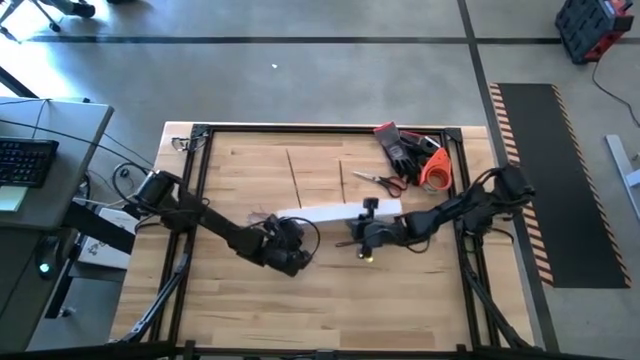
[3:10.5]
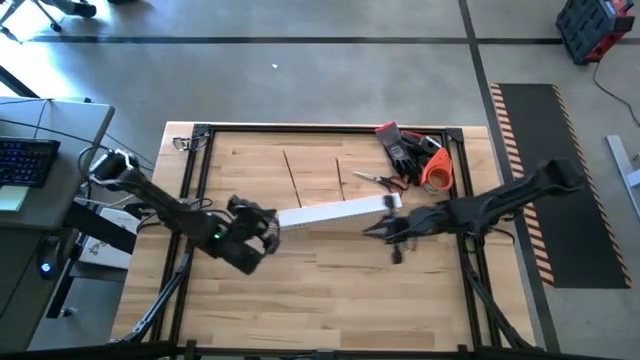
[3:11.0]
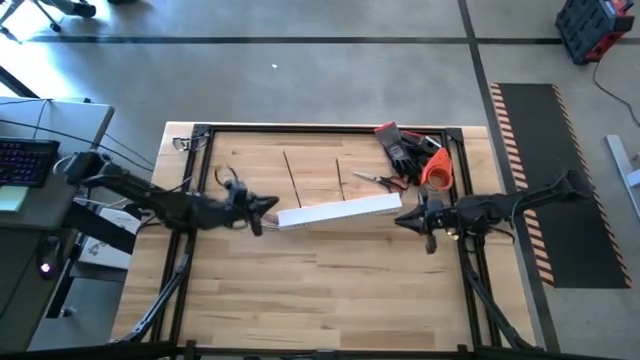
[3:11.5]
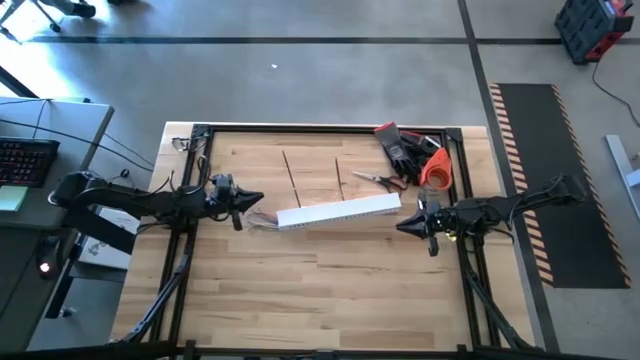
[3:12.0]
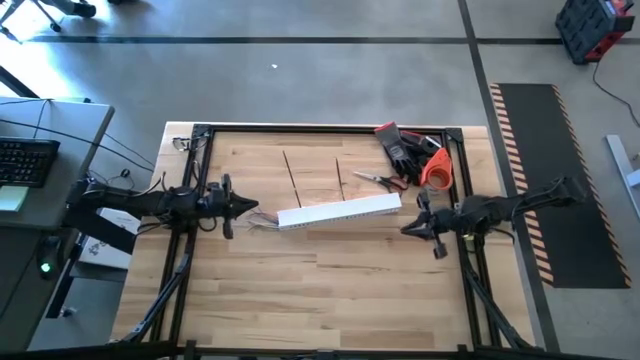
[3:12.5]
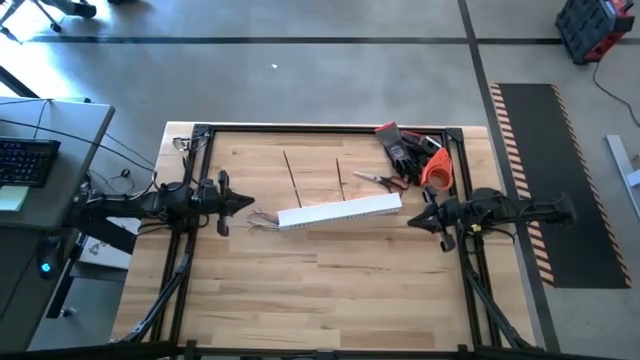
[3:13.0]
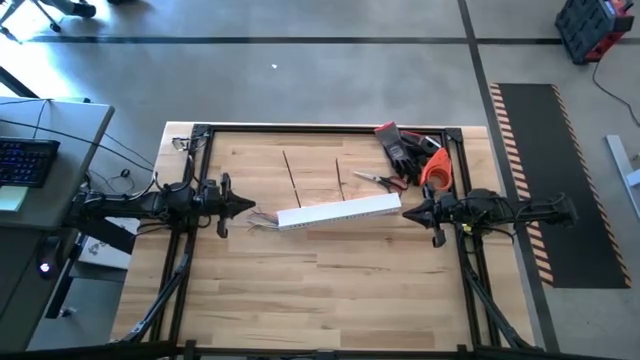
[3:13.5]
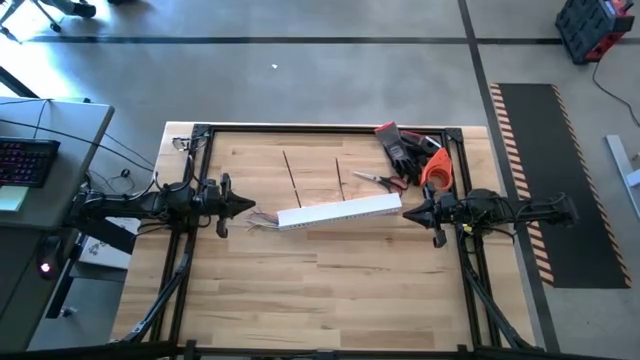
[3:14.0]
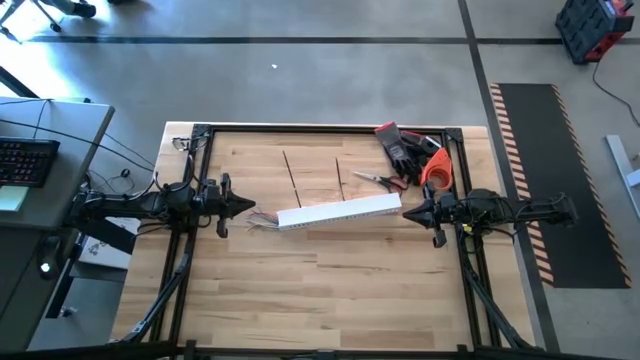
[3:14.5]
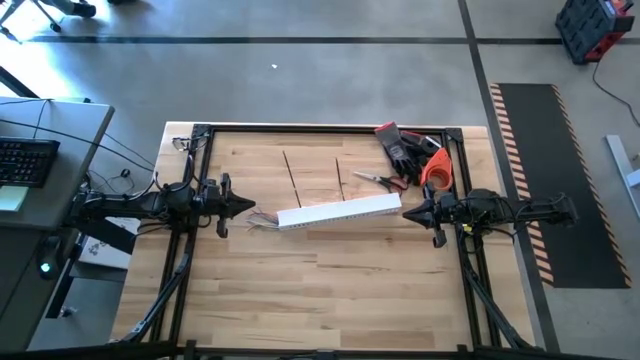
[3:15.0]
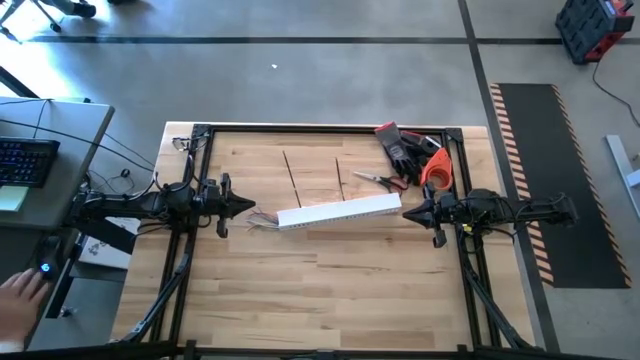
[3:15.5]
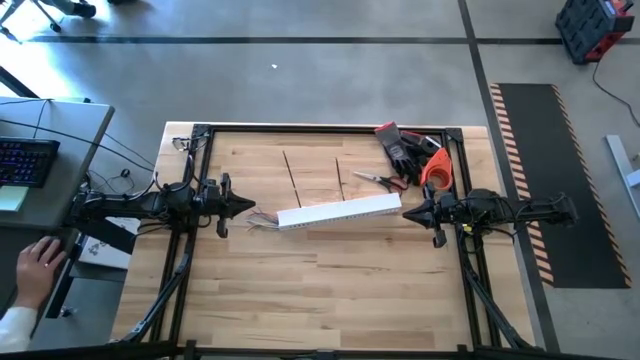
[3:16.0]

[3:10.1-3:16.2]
Task: Ziptie cables
Return to Home Position

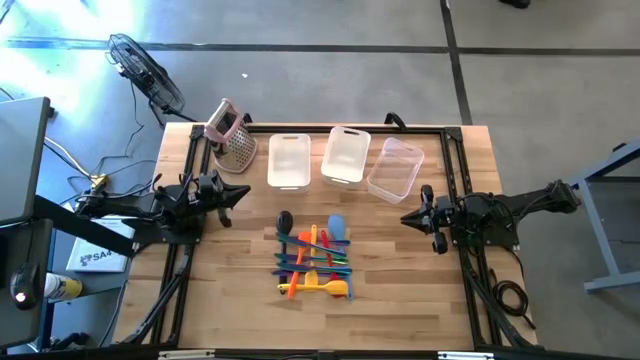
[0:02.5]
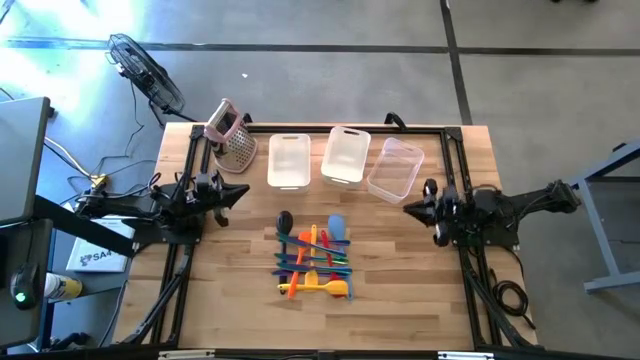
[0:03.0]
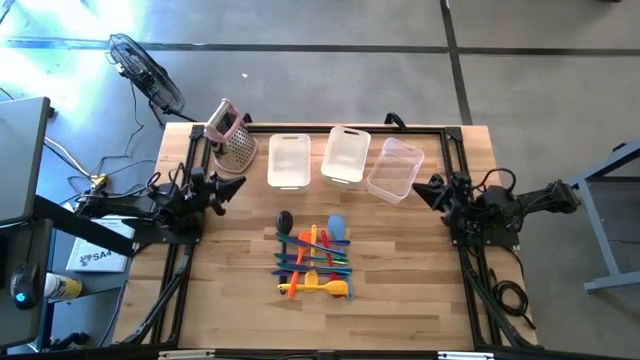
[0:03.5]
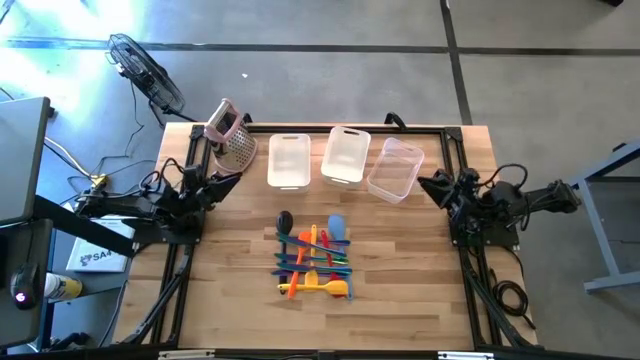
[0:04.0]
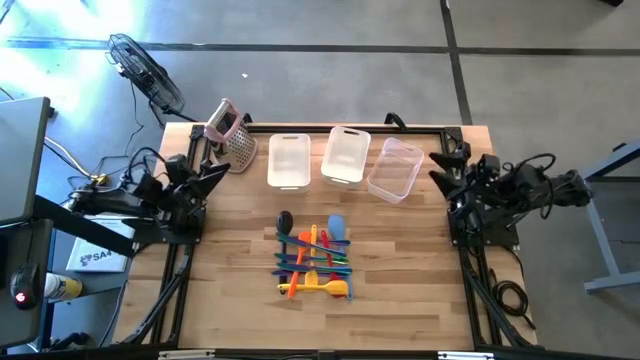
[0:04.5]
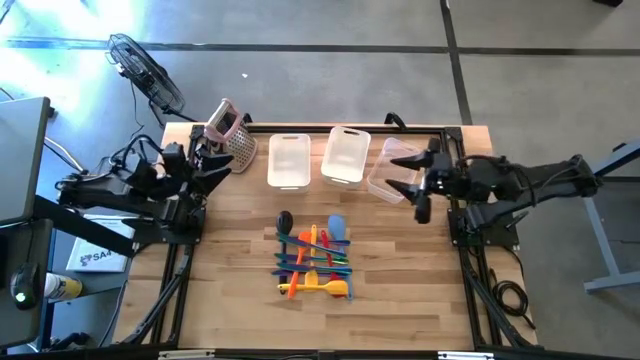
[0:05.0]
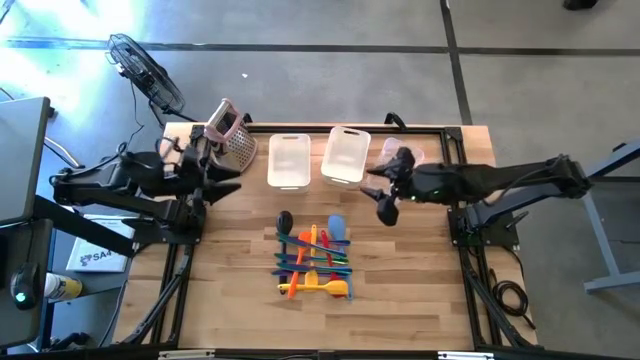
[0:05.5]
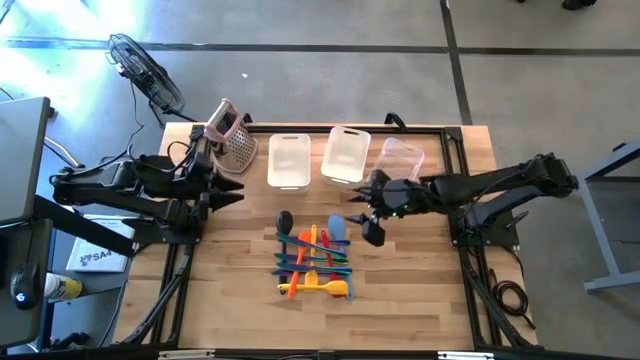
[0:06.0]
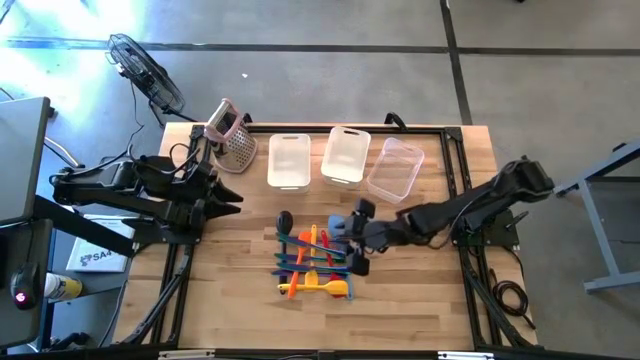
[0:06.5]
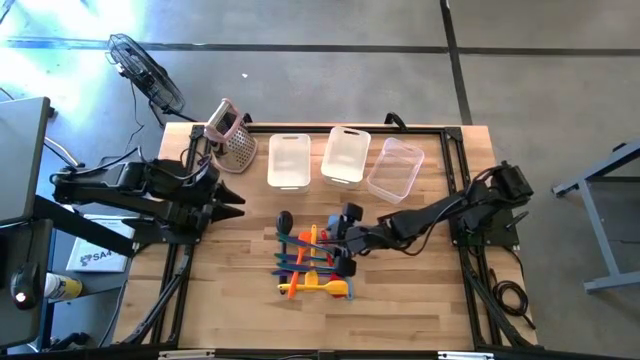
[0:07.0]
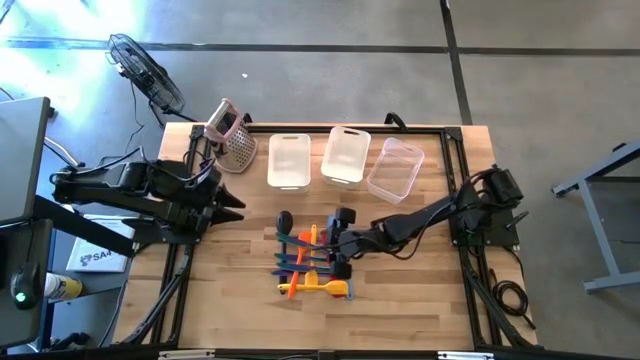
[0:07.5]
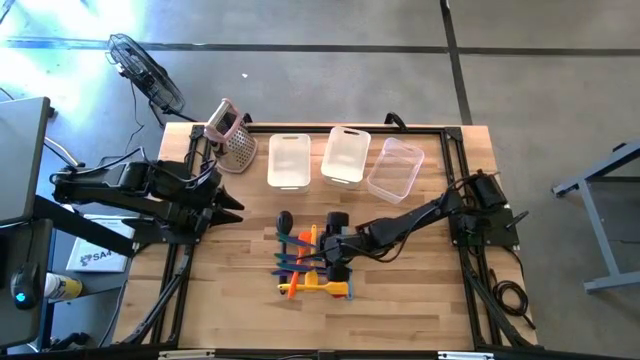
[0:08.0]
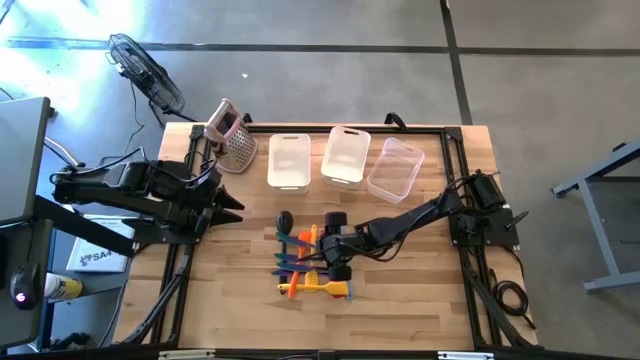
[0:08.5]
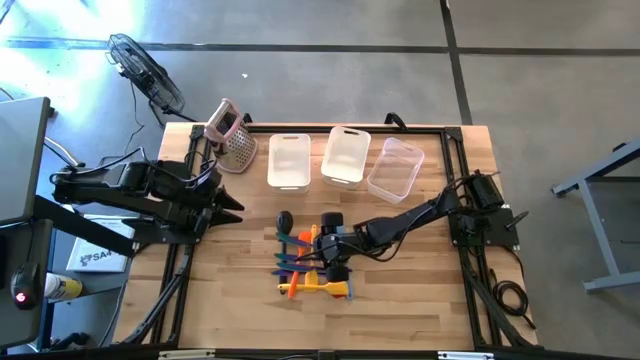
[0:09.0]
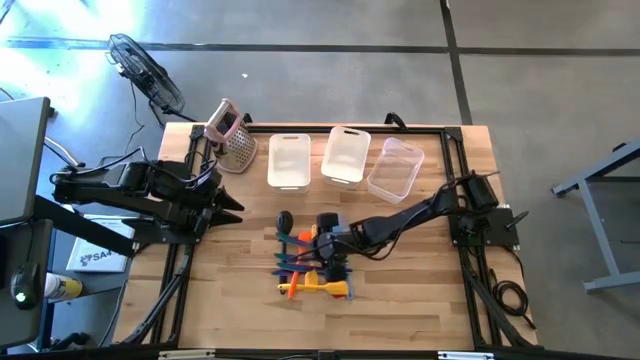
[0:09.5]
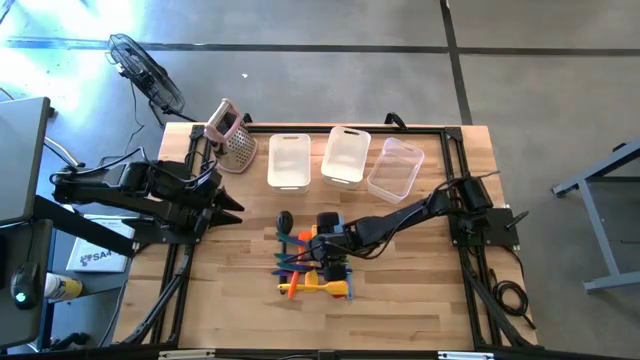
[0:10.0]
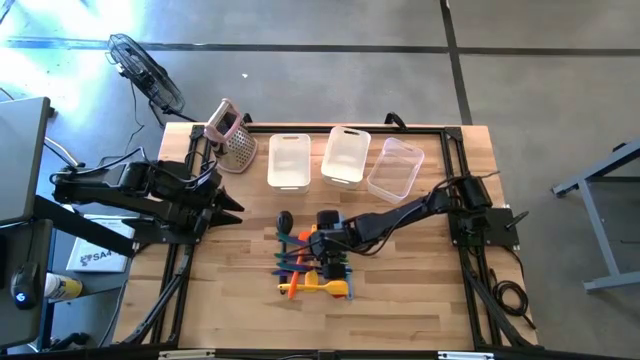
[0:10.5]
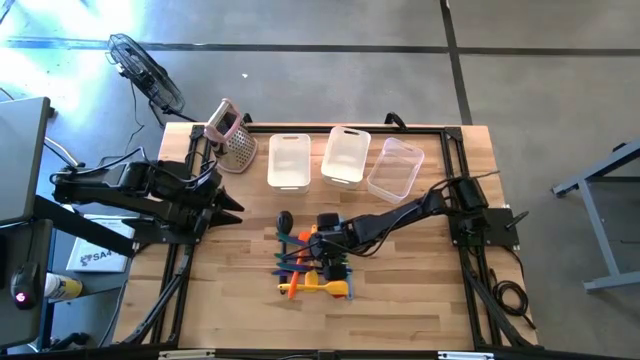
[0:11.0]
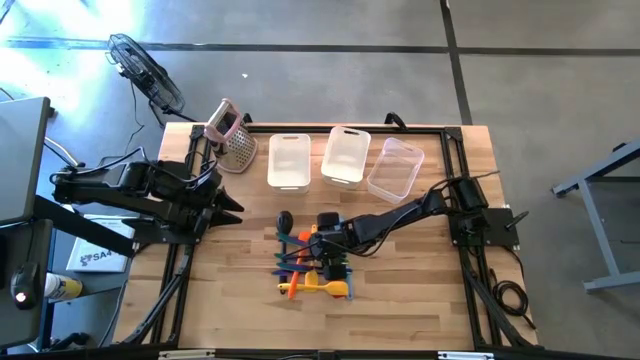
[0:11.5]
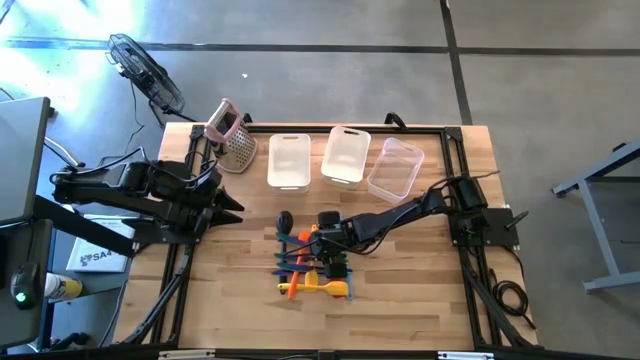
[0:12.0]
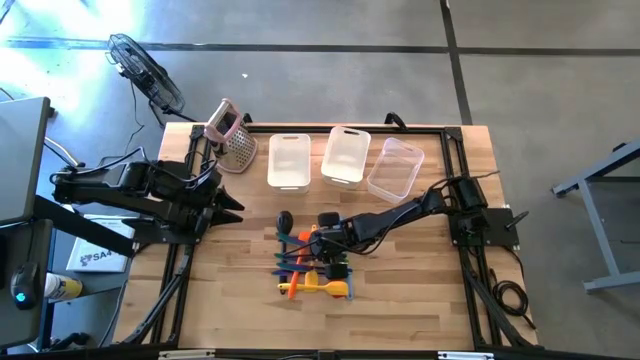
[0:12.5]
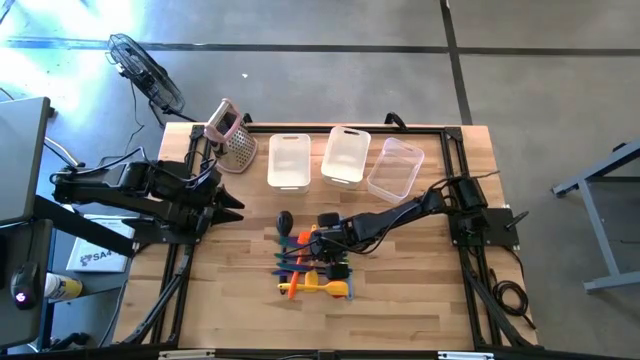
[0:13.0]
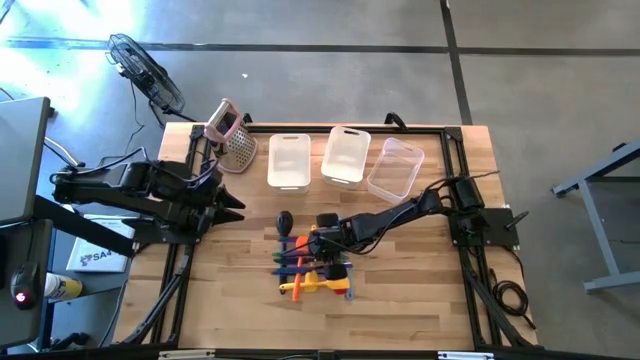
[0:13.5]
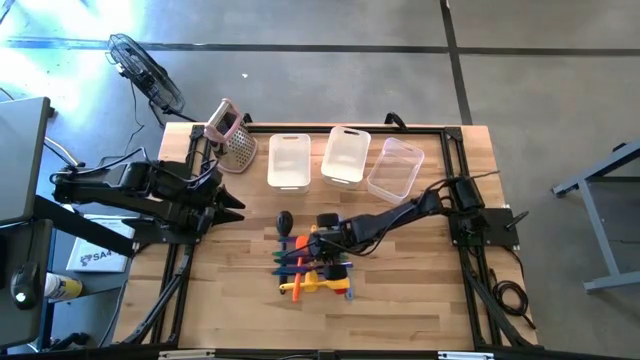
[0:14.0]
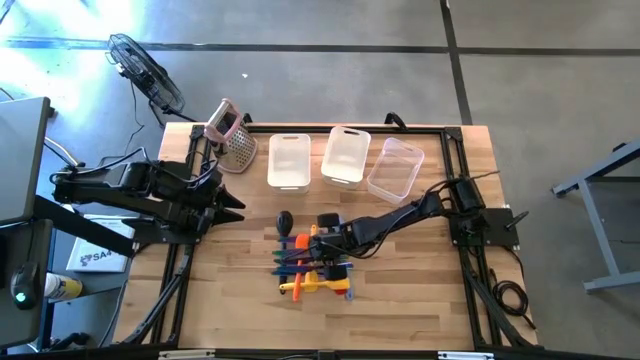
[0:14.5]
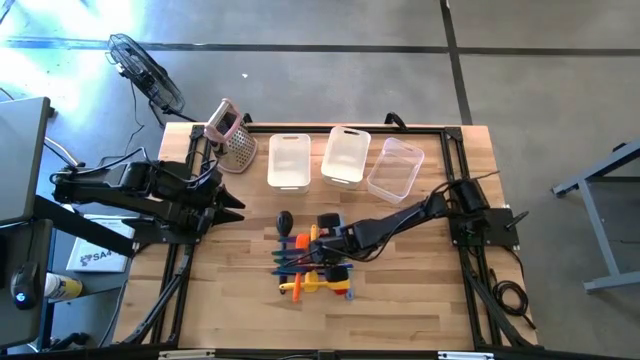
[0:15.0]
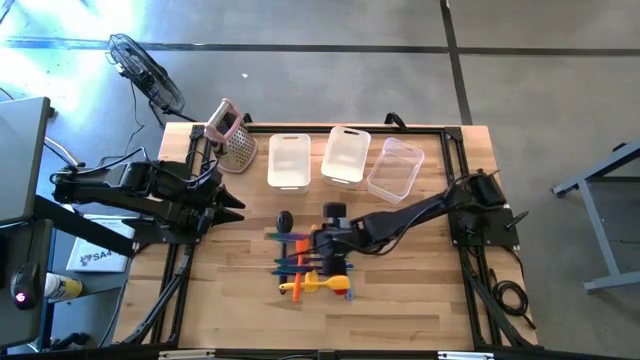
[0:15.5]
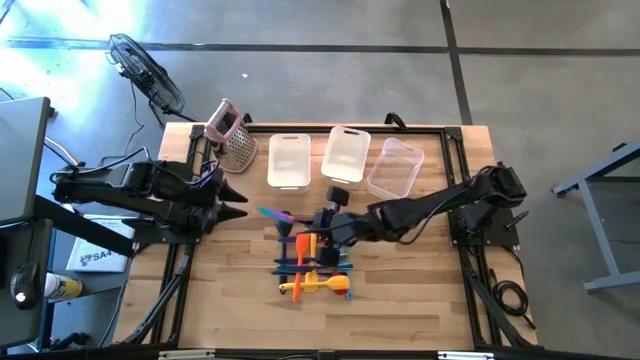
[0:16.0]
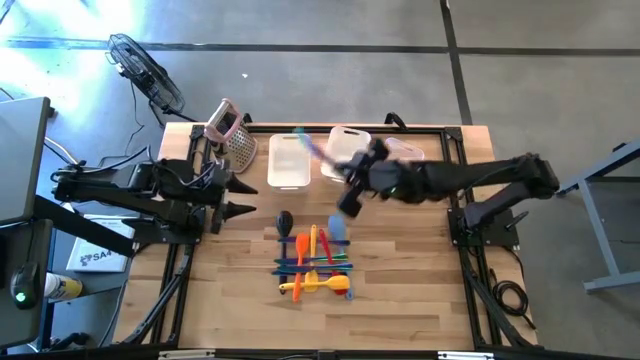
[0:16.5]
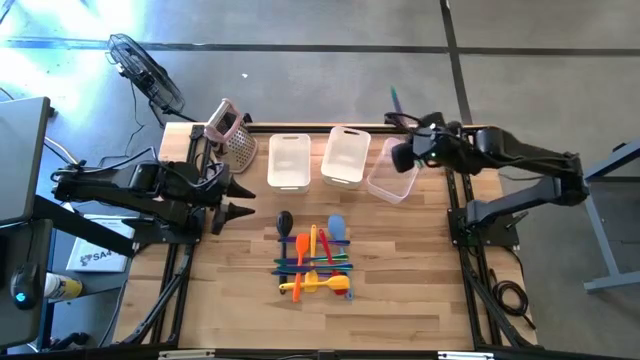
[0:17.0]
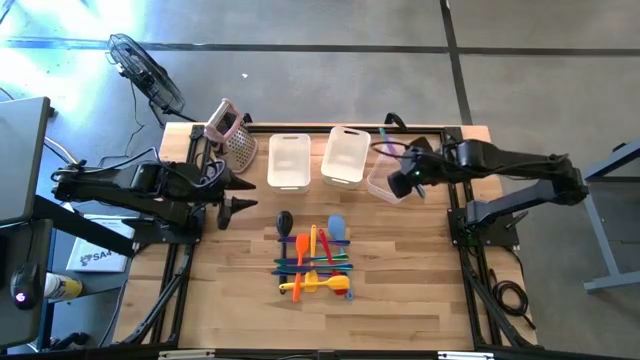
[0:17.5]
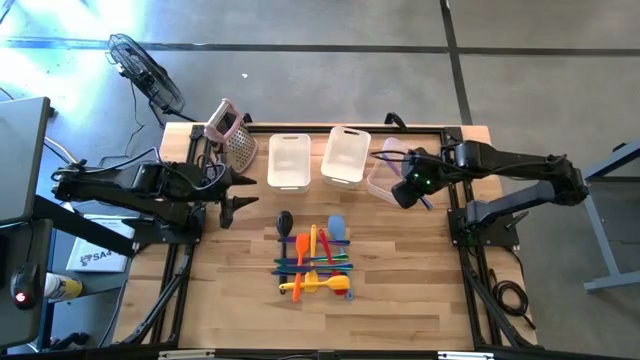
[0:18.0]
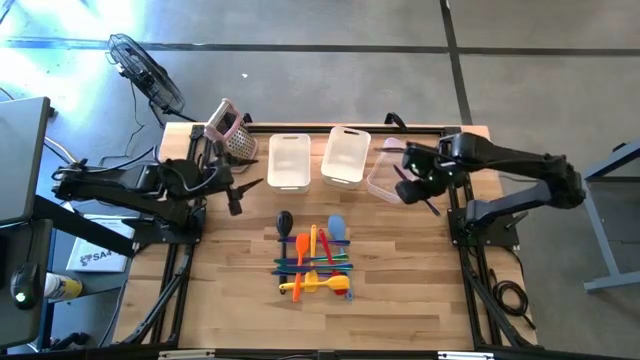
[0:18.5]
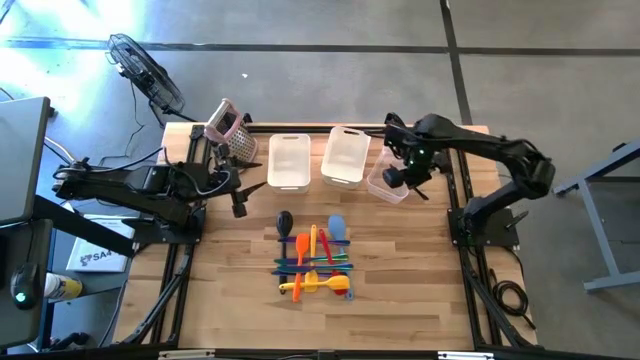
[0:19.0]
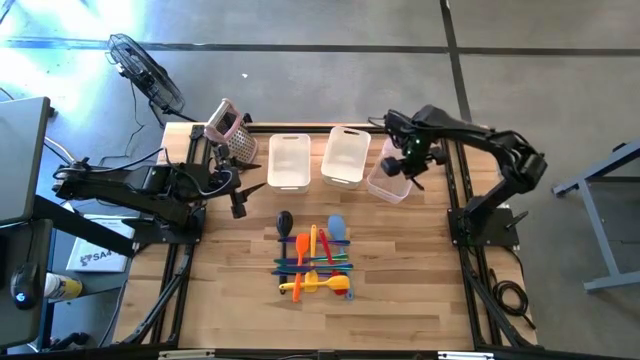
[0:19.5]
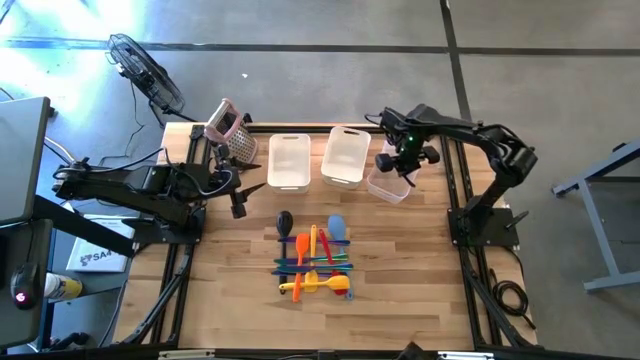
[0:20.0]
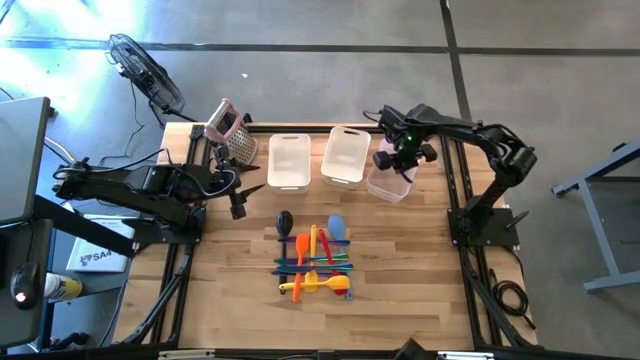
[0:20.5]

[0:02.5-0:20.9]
Task: Pick & Place Kitchen Items
Put the blue table knife into the transparent bin
